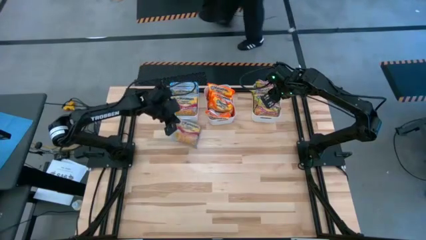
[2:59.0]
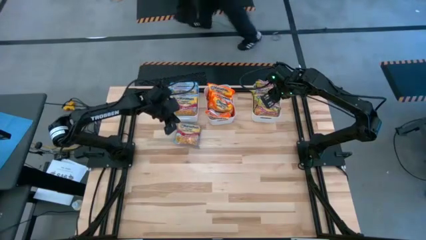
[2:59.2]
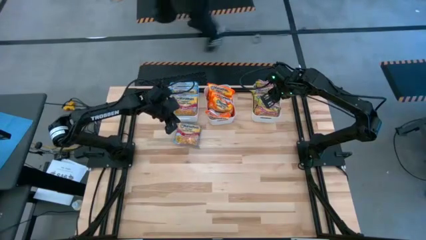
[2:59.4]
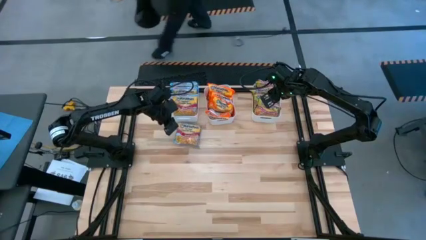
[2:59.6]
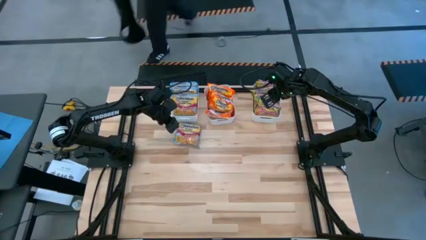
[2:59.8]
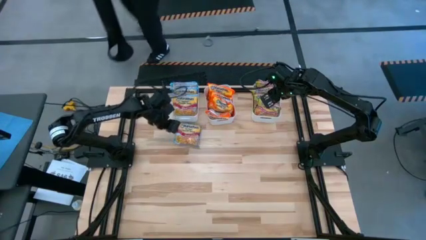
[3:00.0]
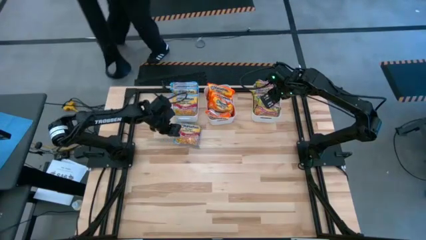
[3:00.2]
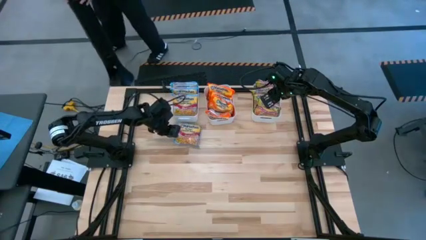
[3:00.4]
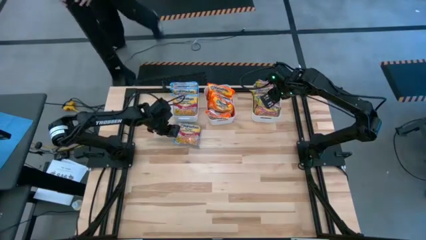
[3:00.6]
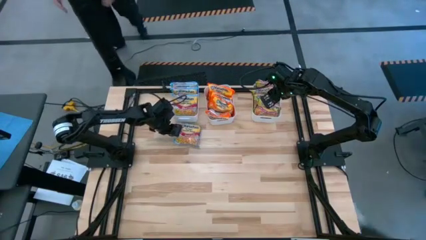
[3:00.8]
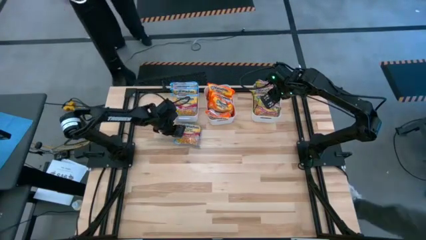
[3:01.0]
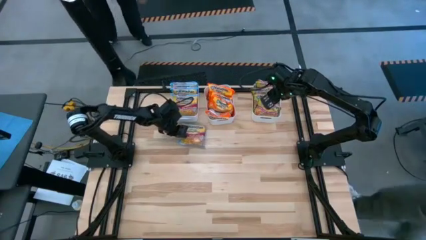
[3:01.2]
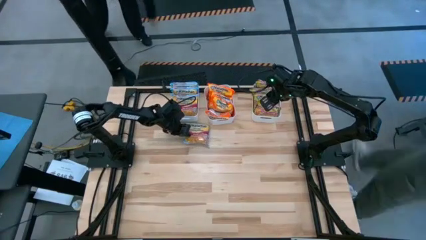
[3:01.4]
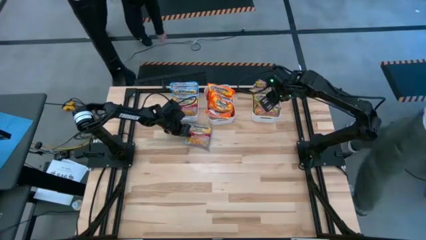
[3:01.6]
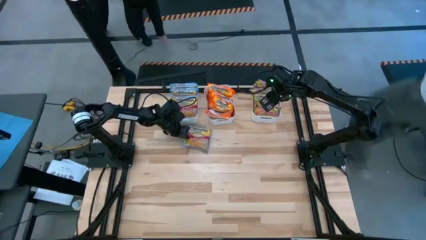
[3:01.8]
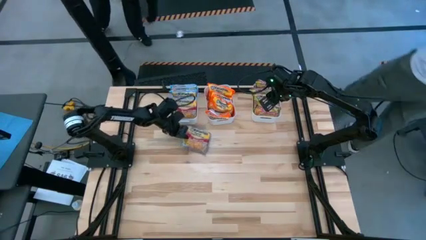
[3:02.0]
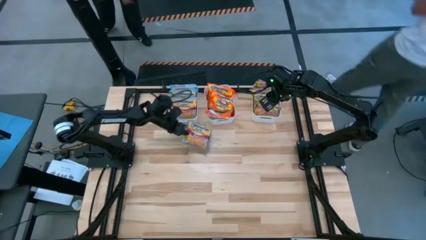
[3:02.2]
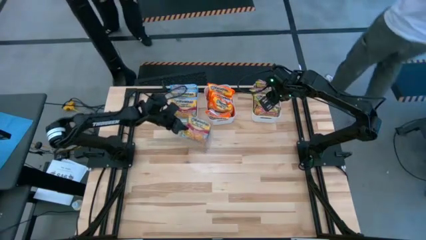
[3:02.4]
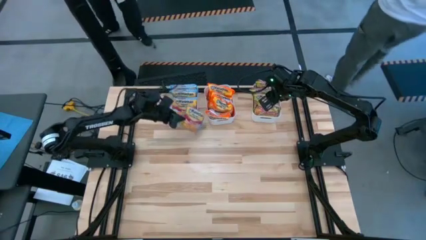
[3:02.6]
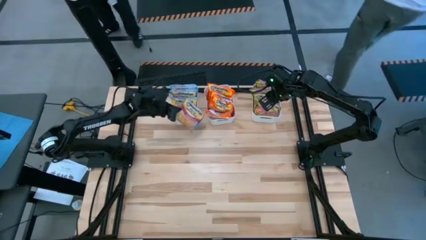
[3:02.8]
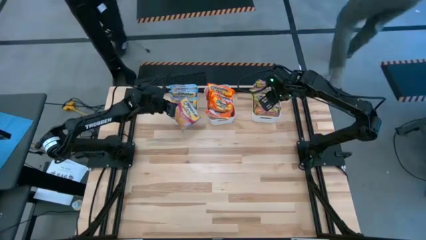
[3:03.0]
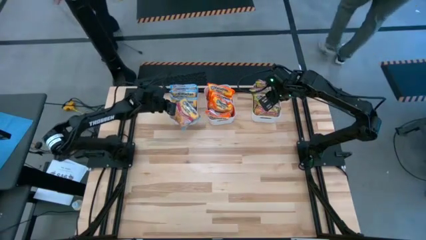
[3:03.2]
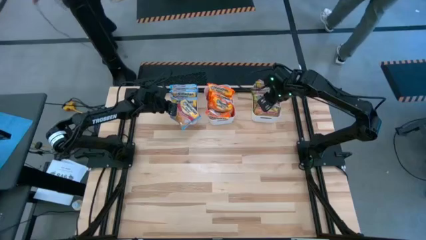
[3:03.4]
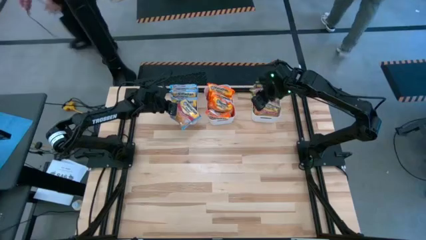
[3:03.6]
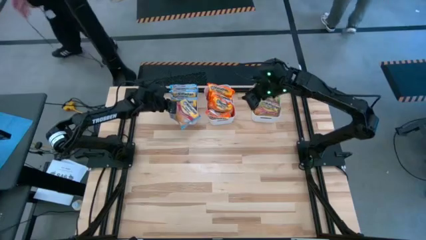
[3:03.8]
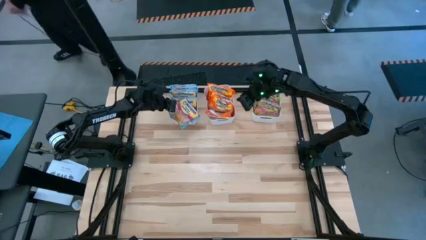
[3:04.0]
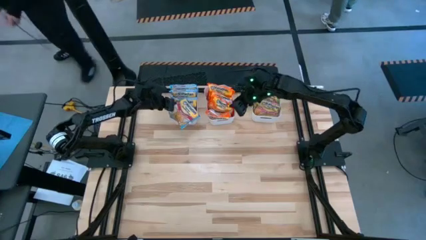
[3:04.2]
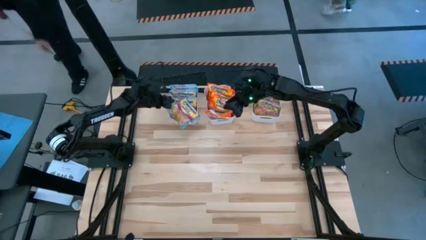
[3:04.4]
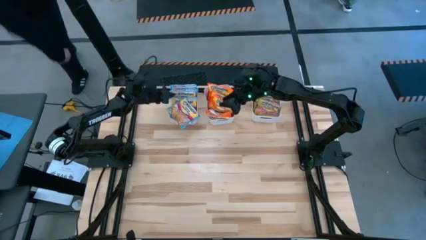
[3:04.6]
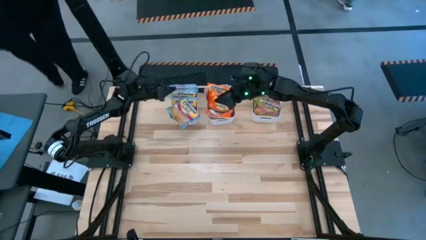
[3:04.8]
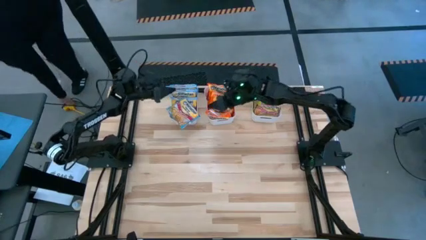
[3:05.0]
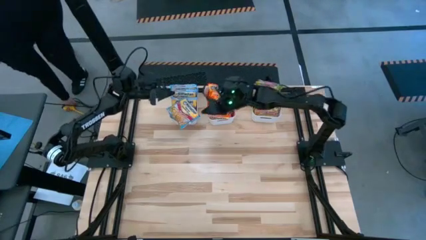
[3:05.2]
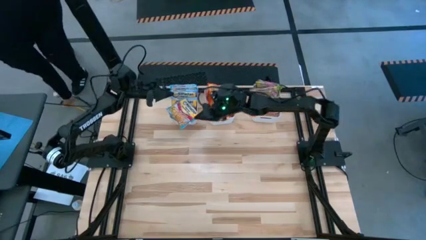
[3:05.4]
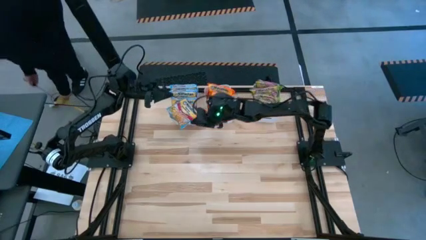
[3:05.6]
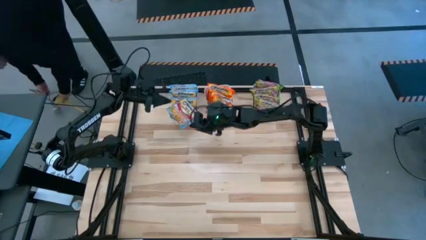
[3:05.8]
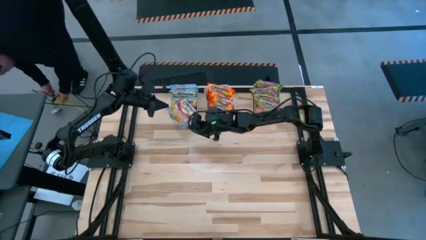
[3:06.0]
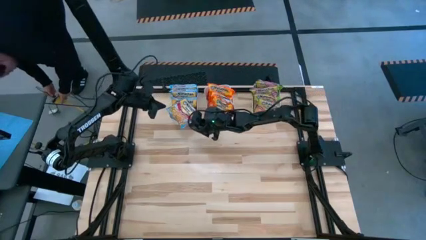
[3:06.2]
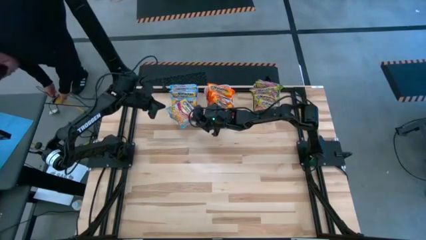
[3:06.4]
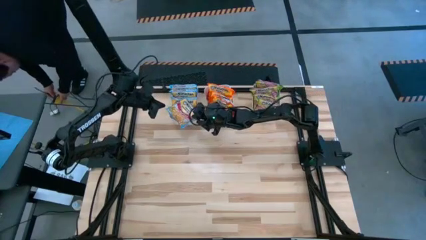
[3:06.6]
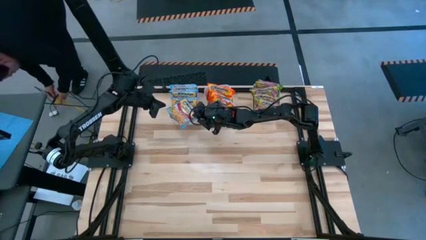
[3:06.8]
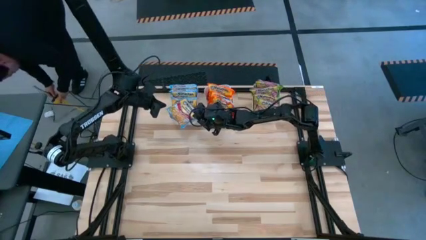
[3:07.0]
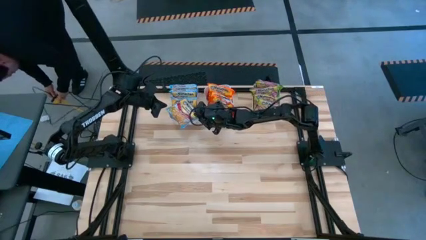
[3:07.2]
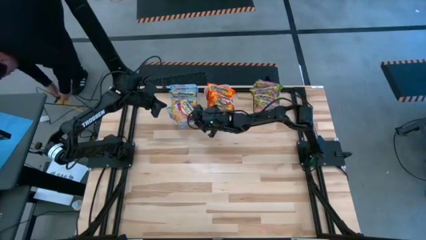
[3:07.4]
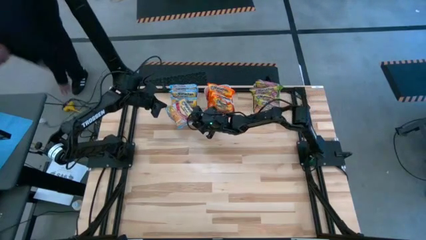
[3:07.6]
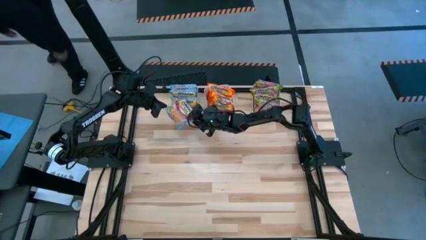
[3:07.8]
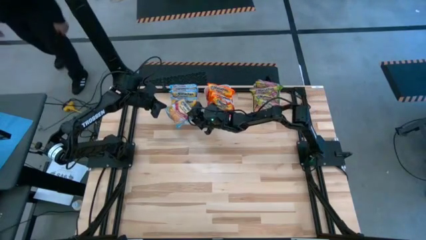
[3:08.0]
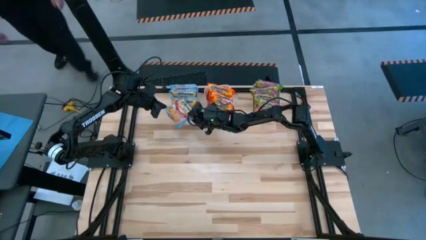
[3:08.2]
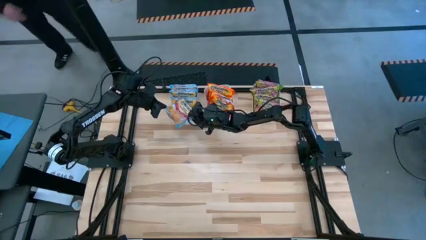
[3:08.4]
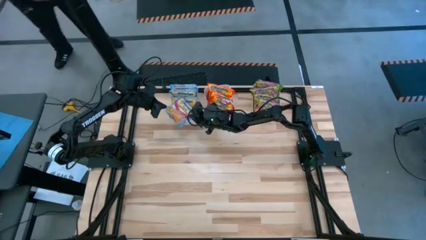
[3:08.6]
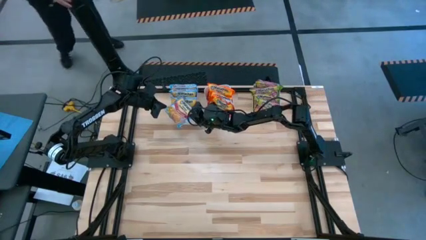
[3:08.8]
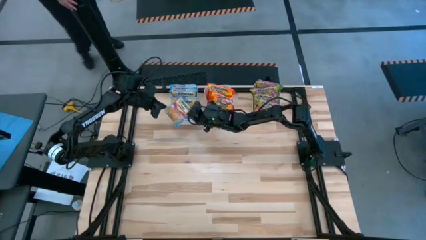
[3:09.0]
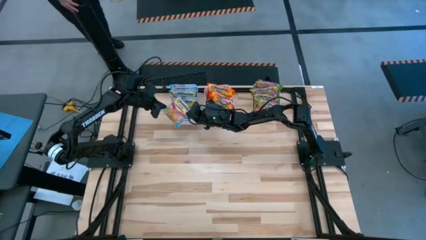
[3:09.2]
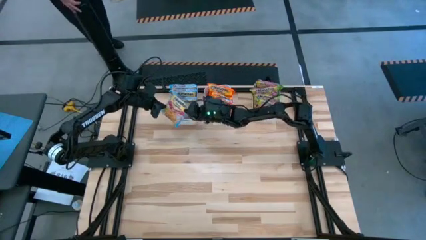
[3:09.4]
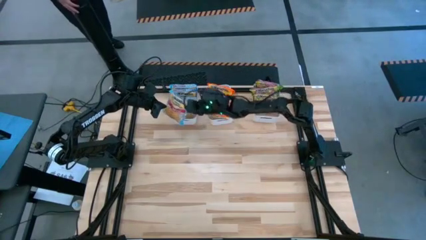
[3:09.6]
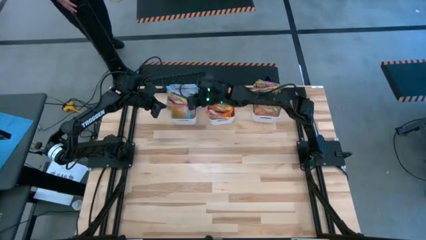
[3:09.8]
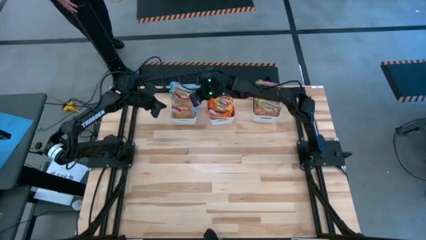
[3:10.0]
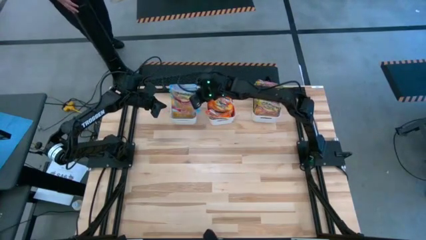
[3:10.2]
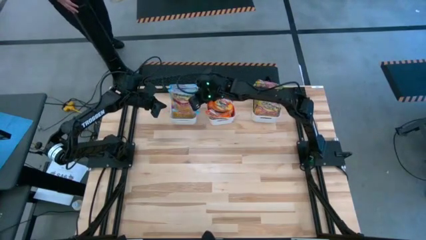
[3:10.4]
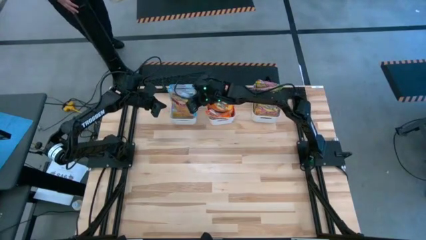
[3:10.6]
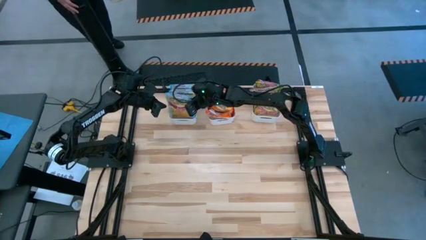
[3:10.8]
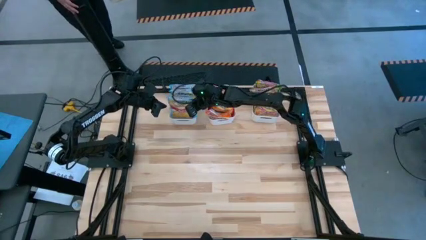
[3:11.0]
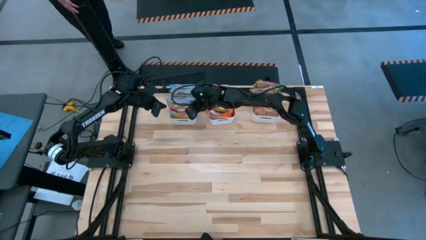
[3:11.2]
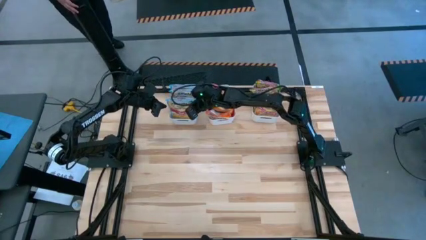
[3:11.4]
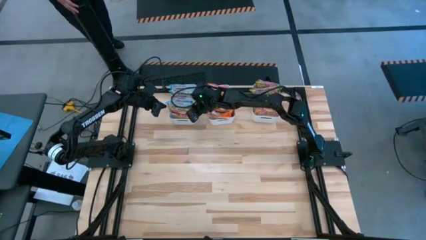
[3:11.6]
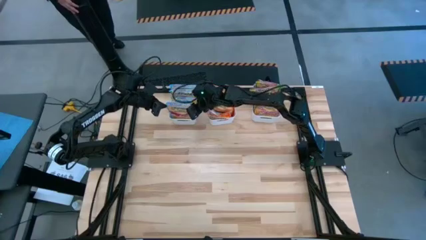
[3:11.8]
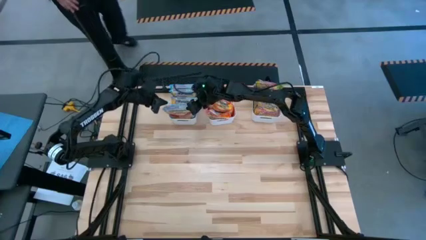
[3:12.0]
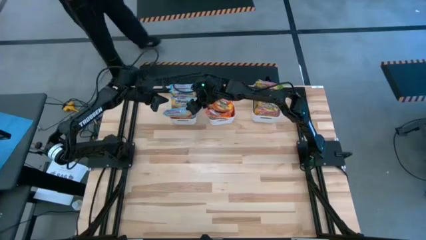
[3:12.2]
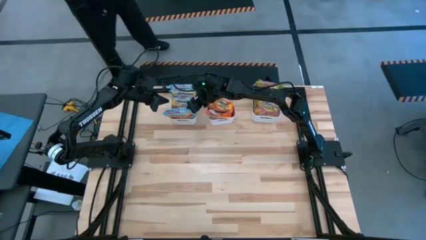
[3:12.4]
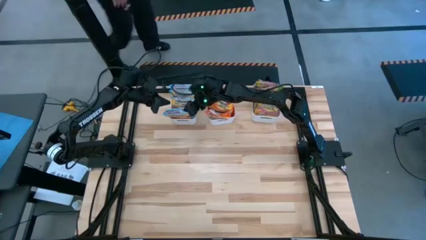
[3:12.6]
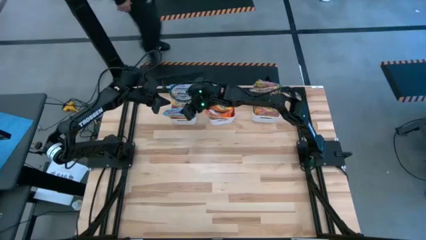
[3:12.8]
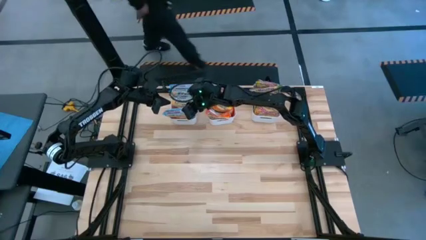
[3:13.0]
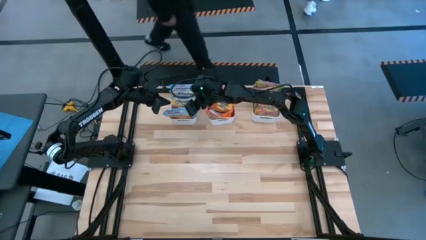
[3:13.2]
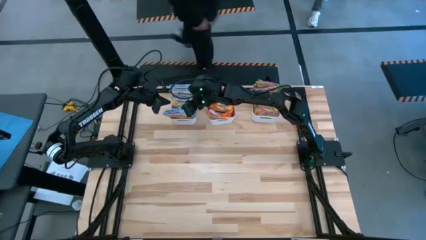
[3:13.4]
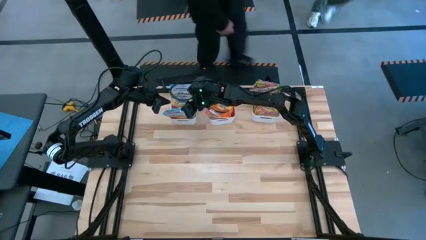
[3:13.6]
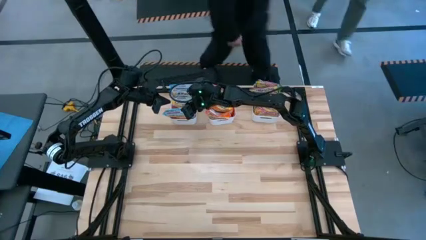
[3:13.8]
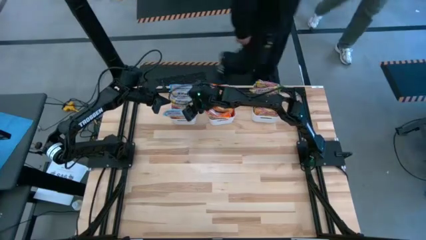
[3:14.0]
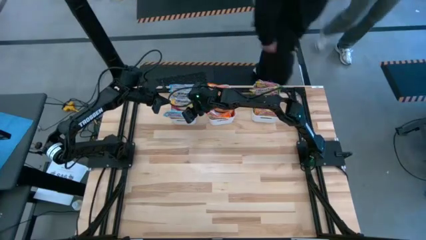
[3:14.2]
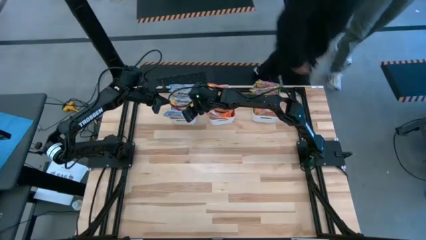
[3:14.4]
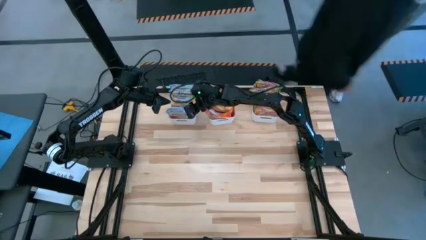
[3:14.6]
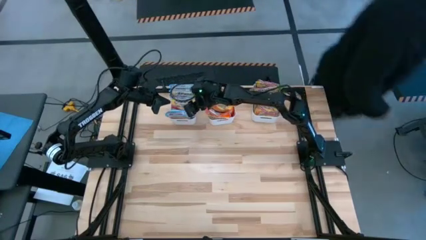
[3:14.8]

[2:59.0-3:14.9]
Task: Sort Maruchan noodles
Put the blue noodle pack into the left white bin
